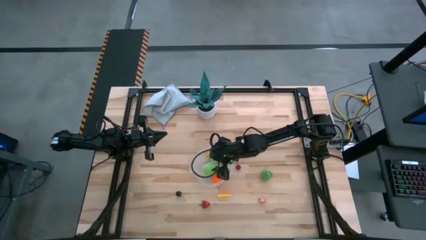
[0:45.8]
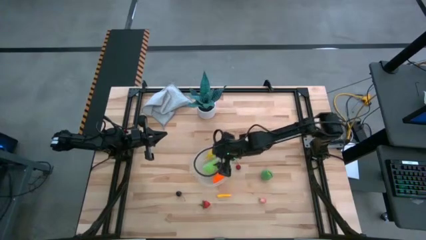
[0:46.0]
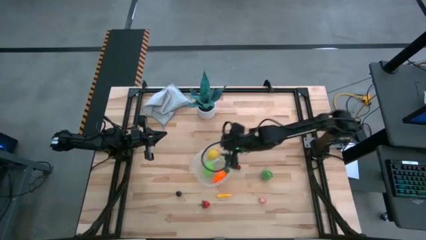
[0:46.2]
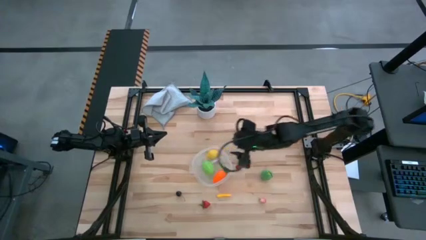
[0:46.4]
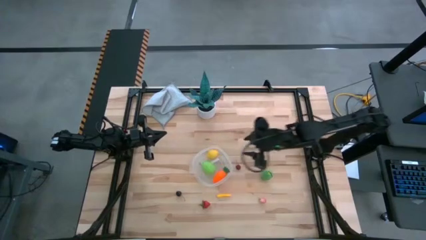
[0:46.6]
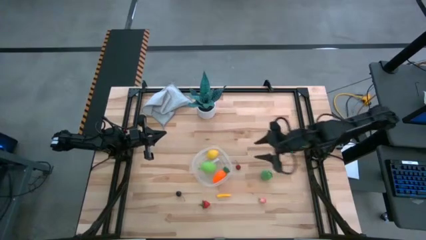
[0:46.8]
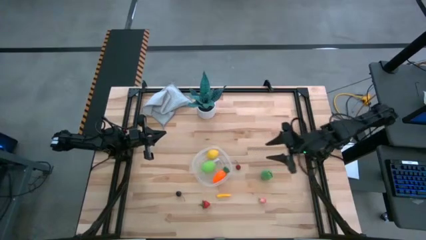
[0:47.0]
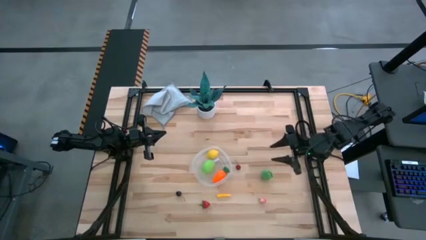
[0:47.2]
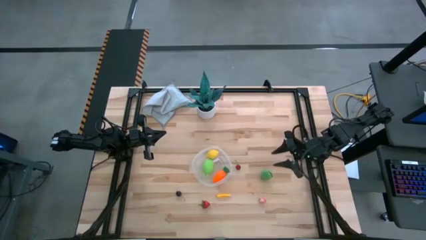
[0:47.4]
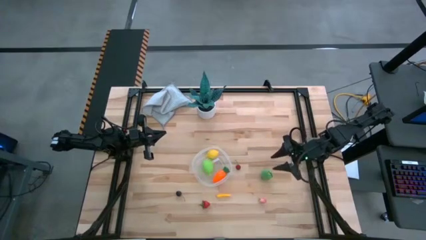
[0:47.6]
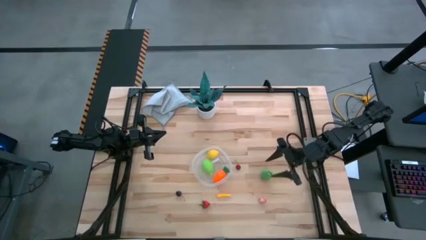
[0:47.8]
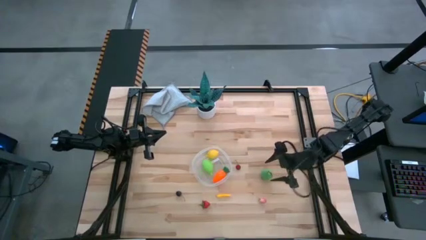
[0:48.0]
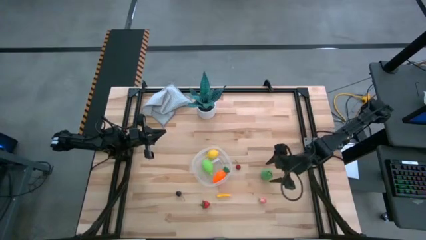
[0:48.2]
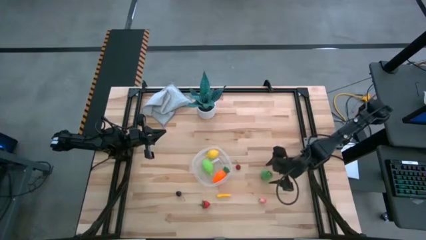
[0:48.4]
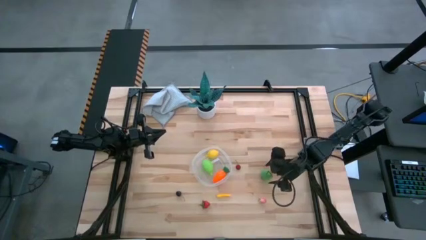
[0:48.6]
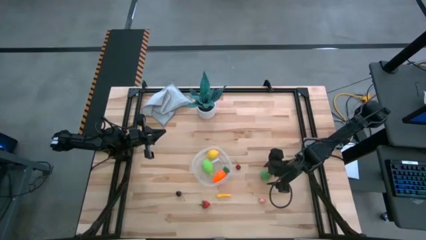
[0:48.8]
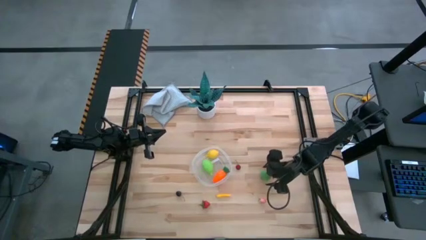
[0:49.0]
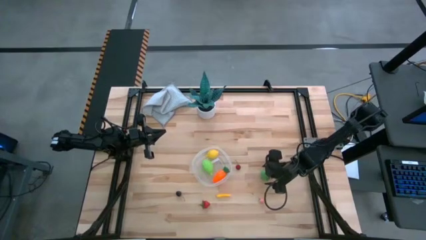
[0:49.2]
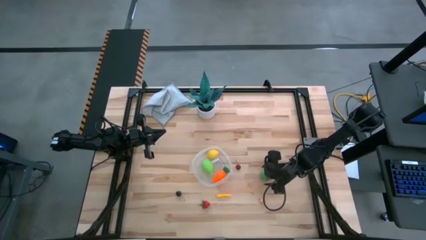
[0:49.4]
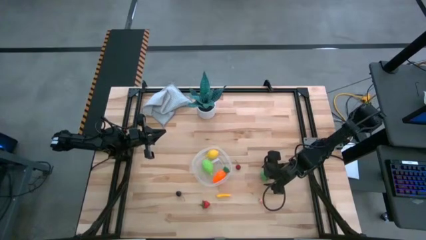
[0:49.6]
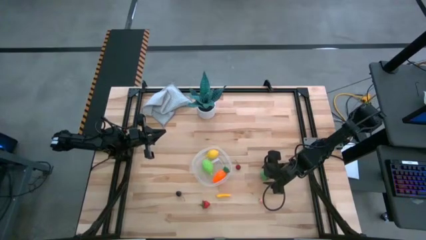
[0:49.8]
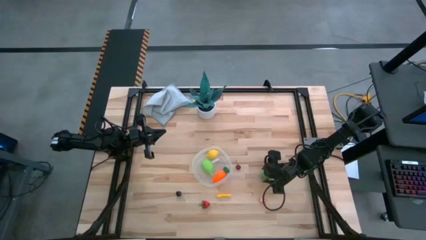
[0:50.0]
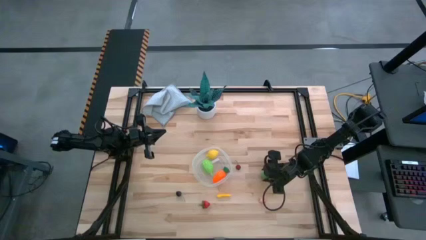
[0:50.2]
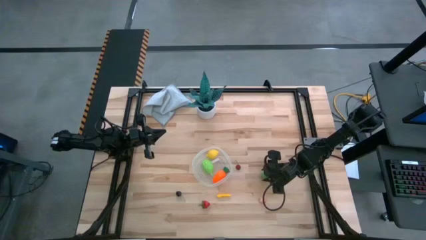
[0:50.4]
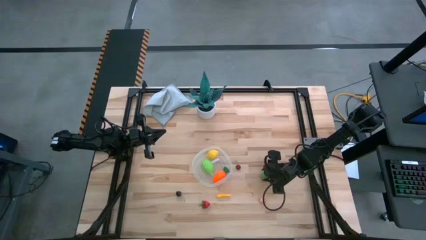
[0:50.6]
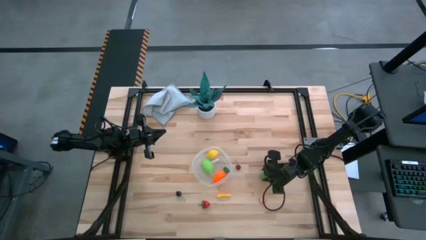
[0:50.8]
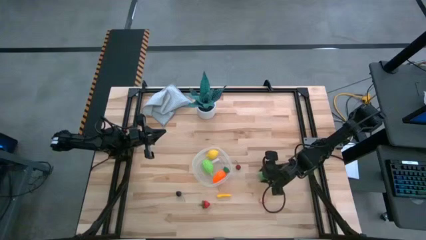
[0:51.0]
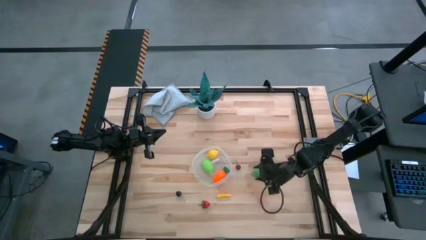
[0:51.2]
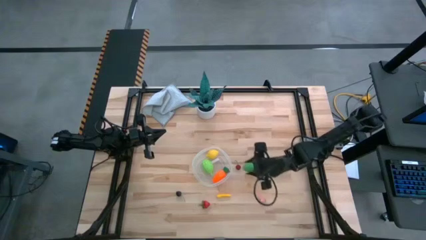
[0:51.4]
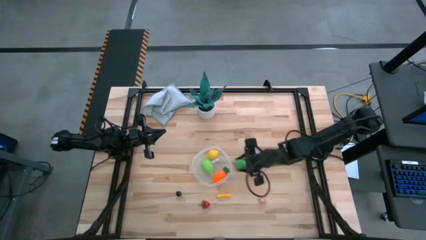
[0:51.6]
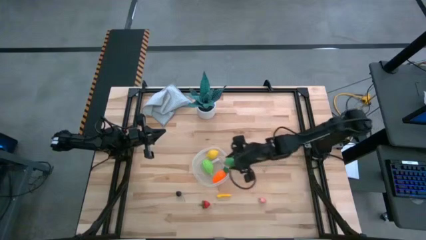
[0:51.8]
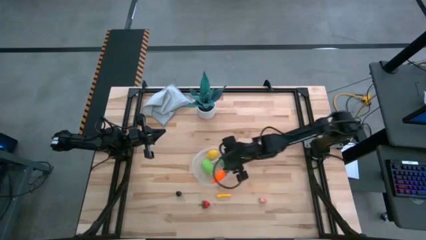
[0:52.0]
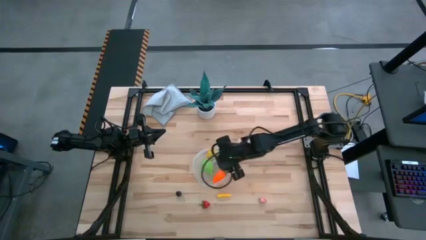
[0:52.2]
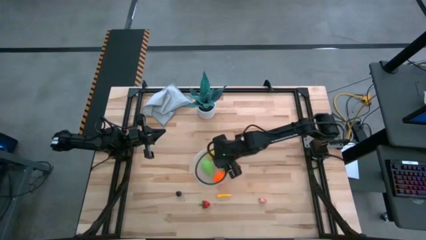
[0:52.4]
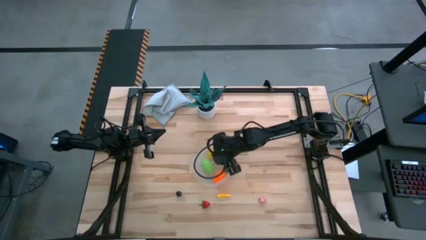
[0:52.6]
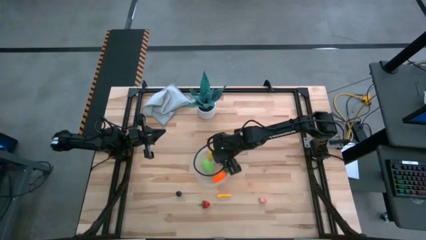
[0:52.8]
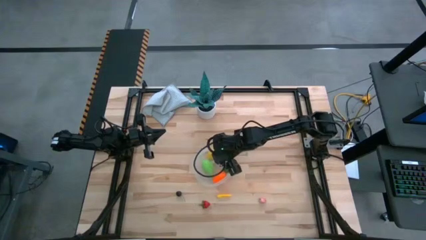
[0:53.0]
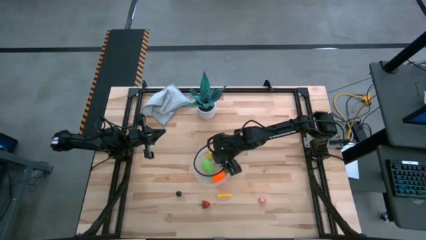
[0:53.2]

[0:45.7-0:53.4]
Task: Pick and placing Produce into tupperware
Put the corn into the bin

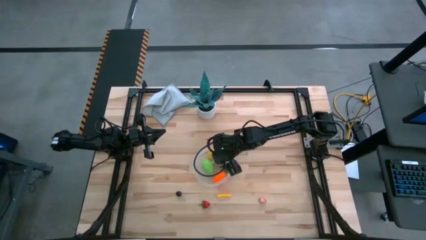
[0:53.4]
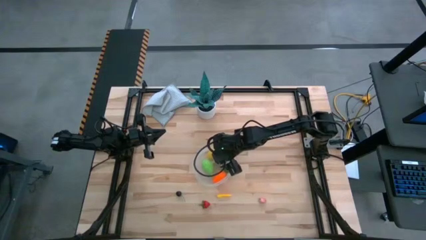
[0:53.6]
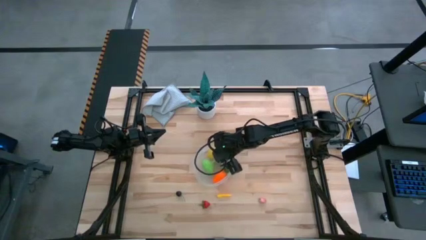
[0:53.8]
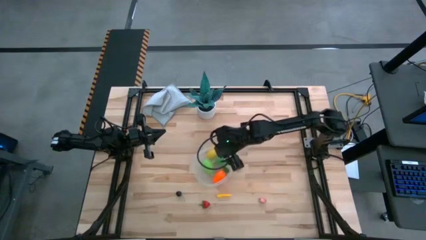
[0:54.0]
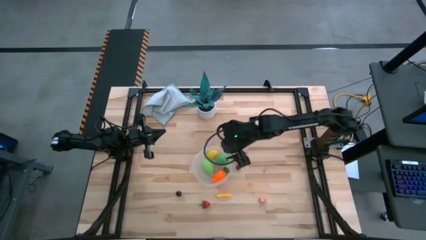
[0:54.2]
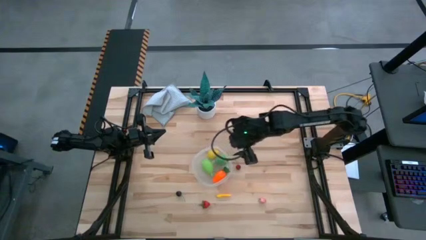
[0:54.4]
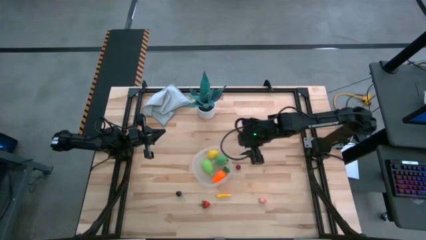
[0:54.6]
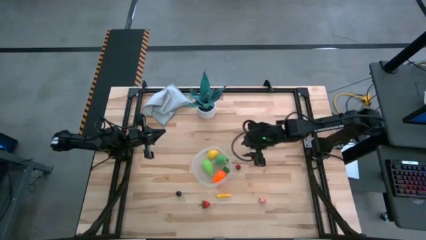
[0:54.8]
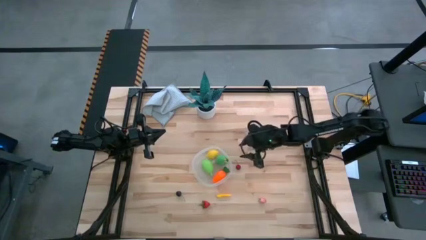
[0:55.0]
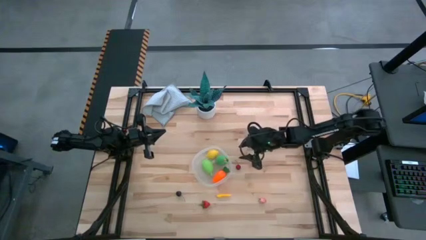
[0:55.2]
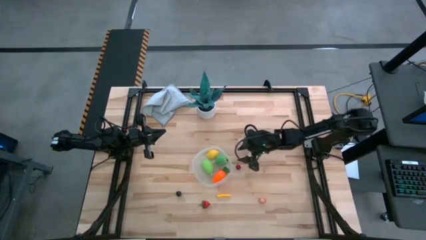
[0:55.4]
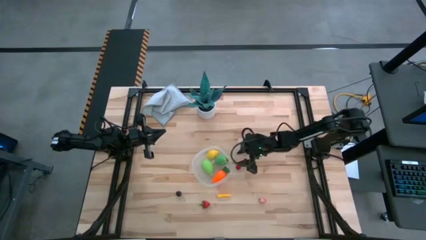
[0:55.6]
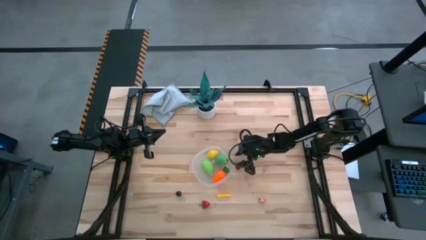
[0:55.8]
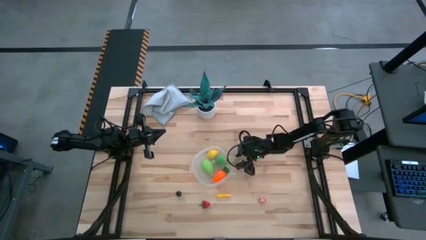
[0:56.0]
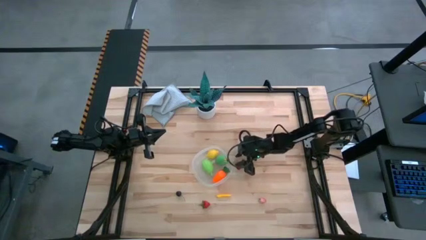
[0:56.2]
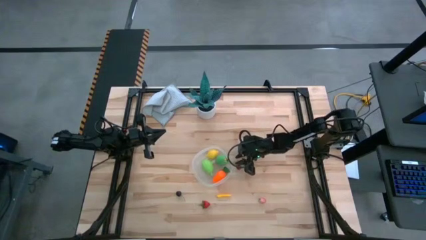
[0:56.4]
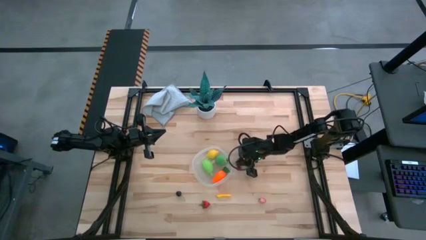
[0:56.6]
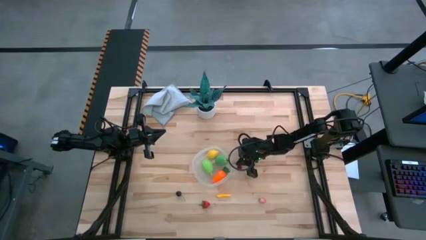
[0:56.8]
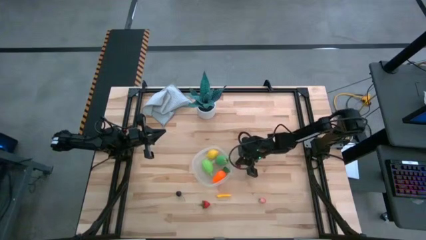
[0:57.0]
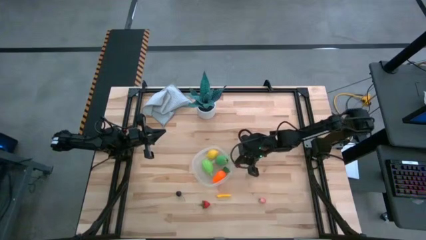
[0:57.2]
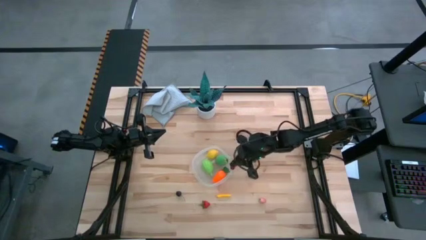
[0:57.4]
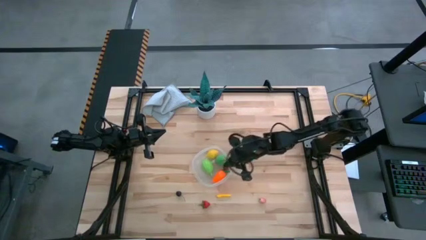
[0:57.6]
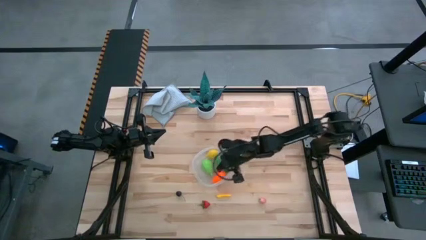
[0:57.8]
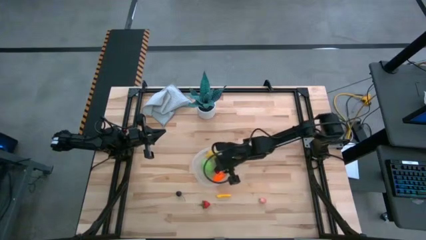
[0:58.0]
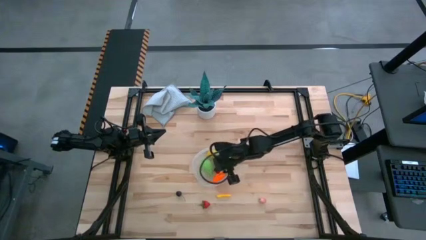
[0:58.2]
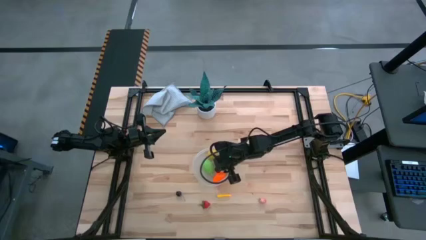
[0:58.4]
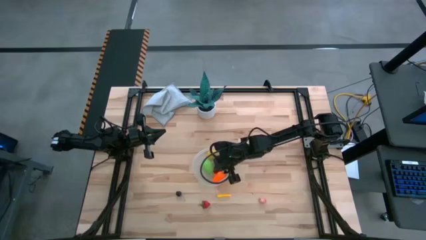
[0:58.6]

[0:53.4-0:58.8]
Put the red cherry into the bin

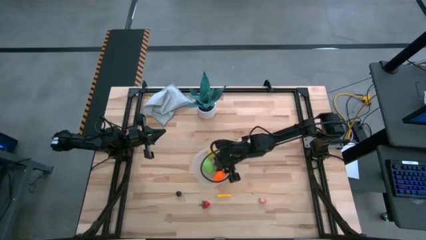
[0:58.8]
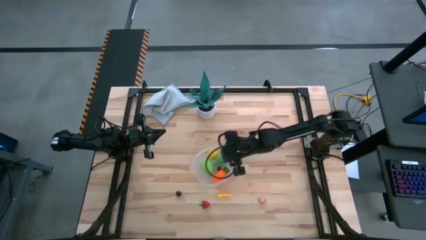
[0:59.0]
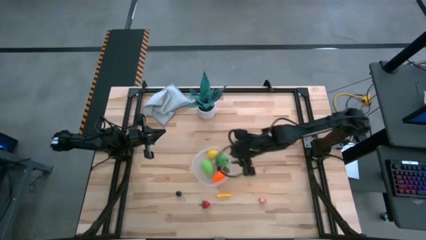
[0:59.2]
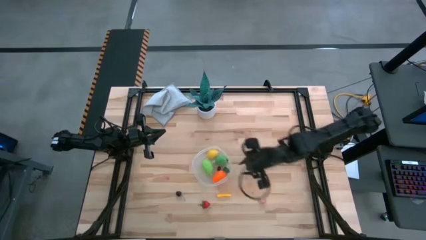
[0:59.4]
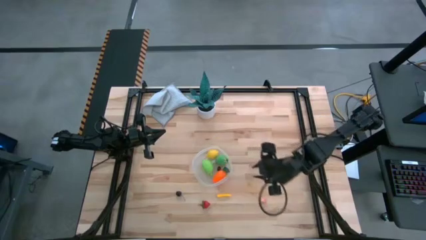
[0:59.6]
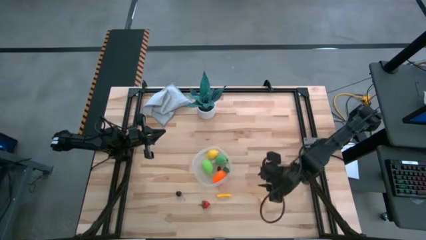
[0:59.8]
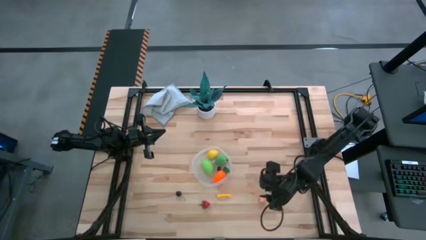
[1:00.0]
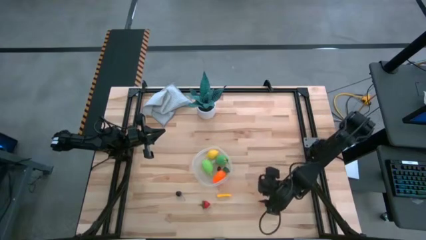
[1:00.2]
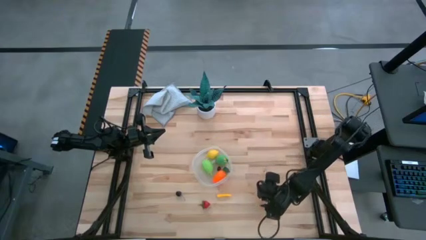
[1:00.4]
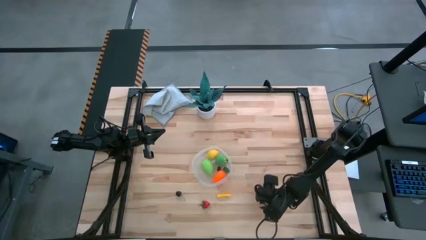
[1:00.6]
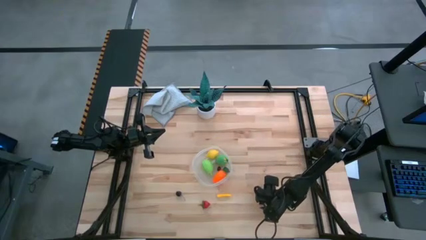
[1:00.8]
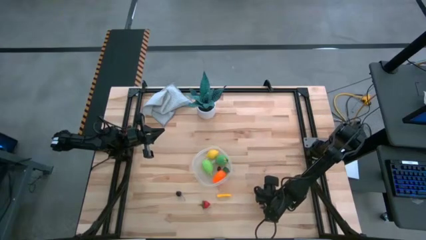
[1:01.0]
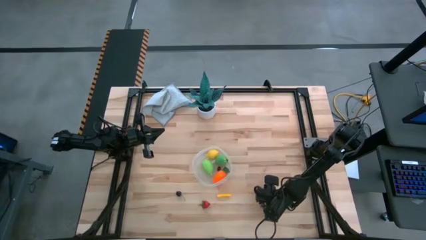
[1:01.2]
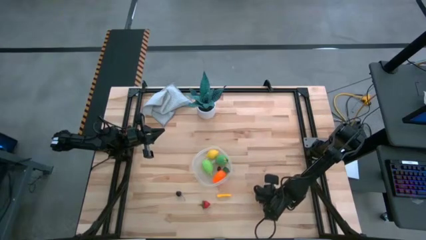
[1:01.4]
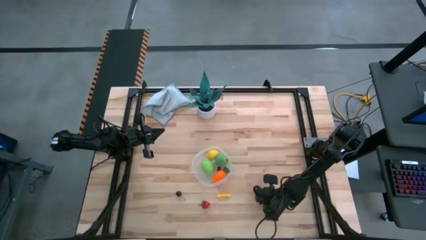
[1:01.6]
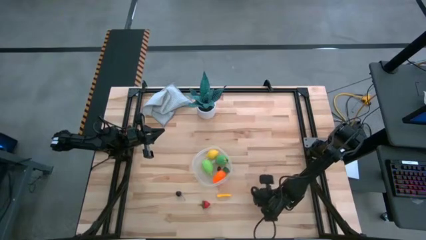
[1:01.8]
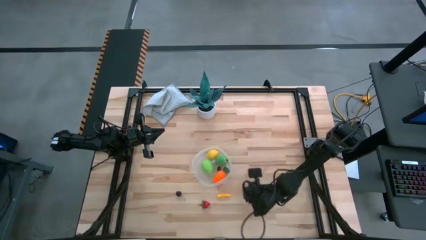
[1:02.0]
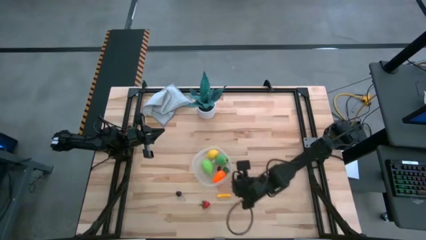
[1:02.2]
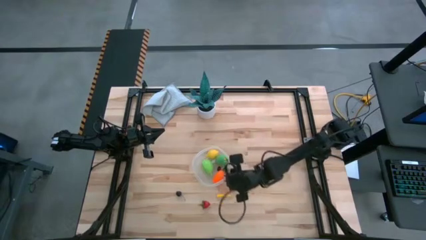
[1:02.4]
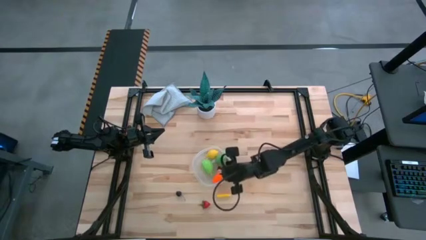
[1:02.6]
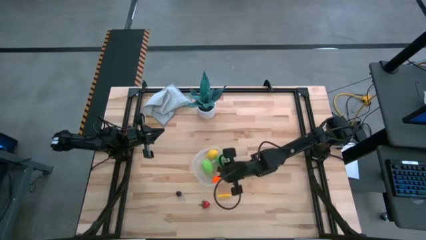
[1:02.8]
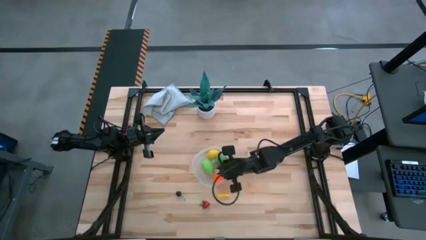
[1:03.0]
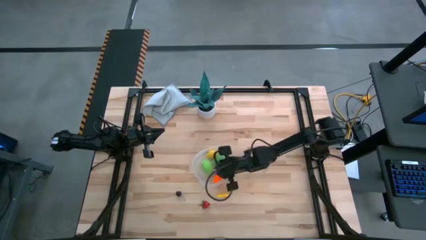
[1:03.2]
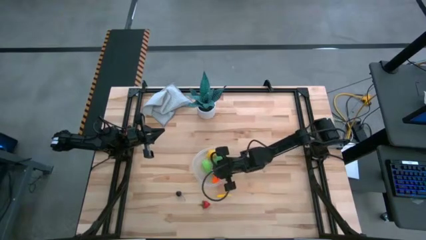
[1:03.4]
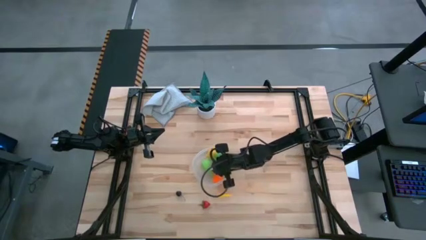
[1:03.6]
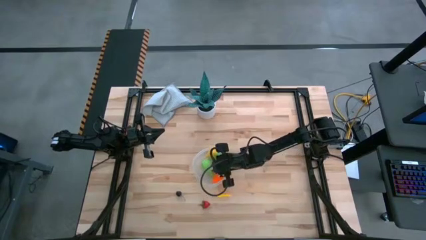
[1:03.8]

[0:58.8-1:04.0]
Put the peach into the bin
